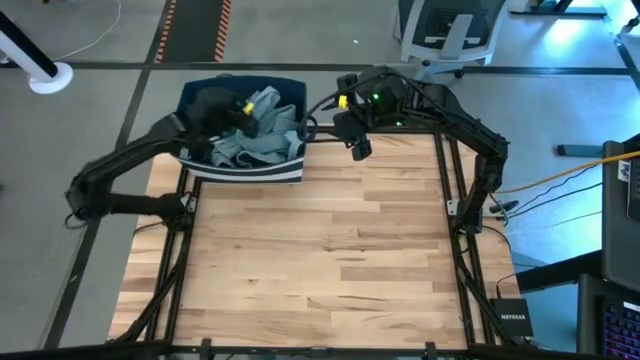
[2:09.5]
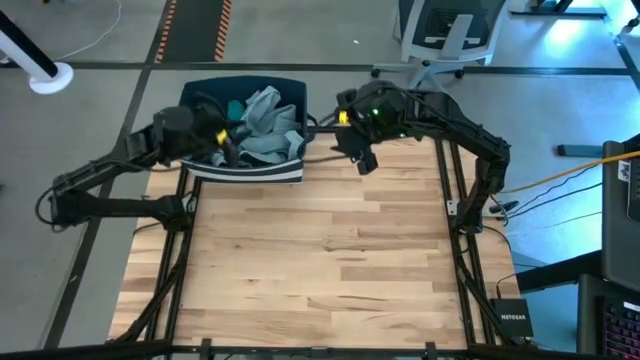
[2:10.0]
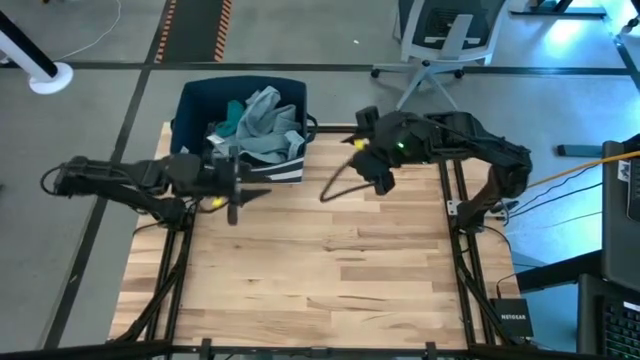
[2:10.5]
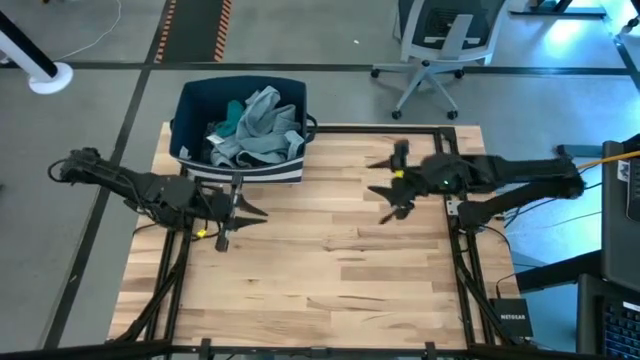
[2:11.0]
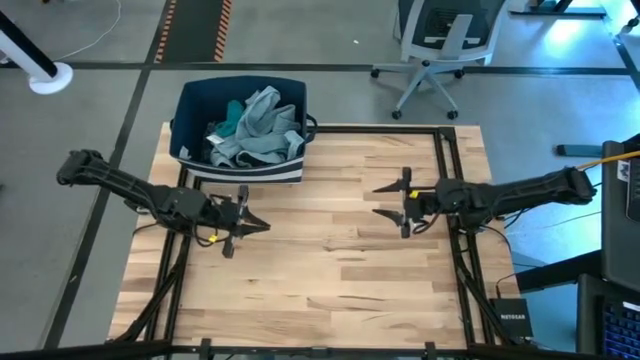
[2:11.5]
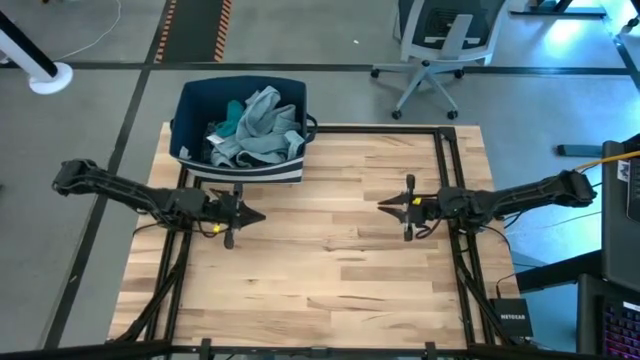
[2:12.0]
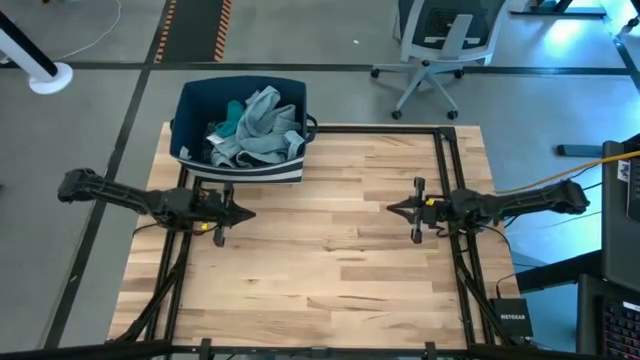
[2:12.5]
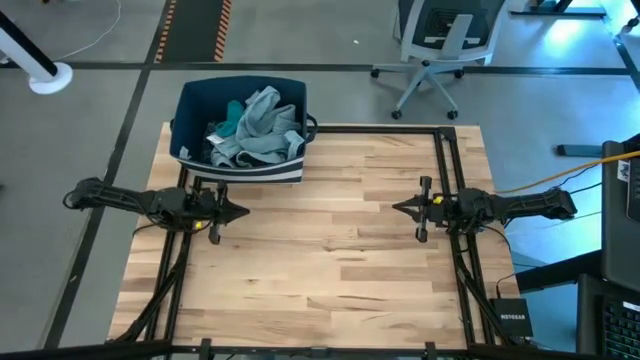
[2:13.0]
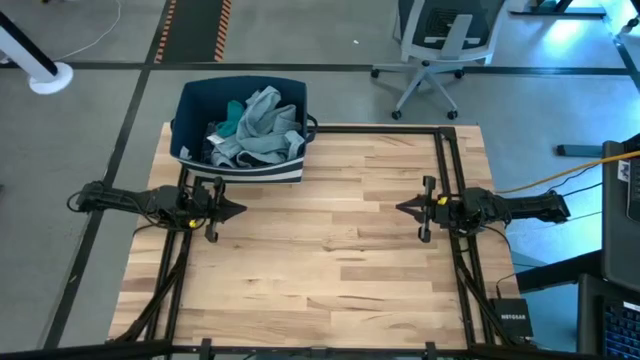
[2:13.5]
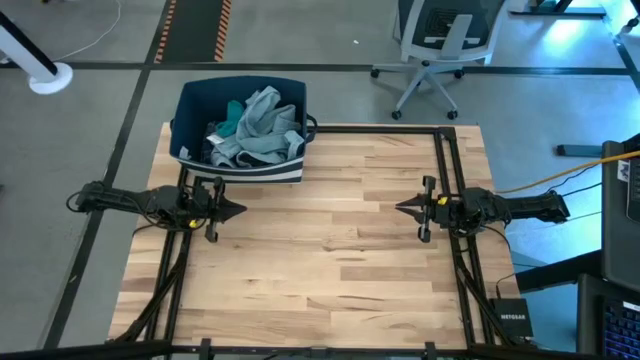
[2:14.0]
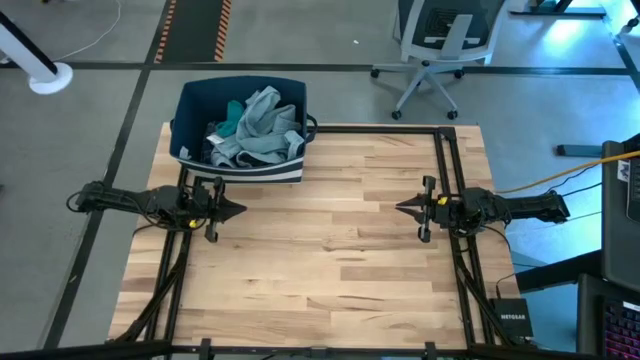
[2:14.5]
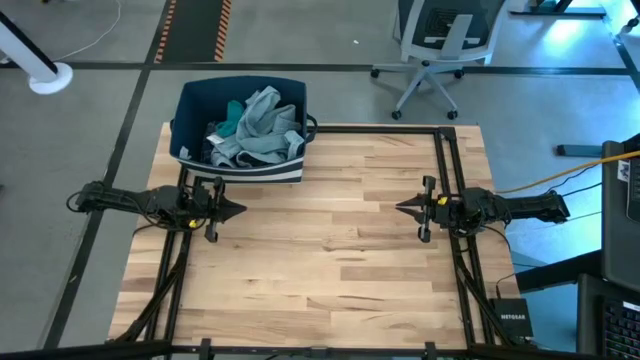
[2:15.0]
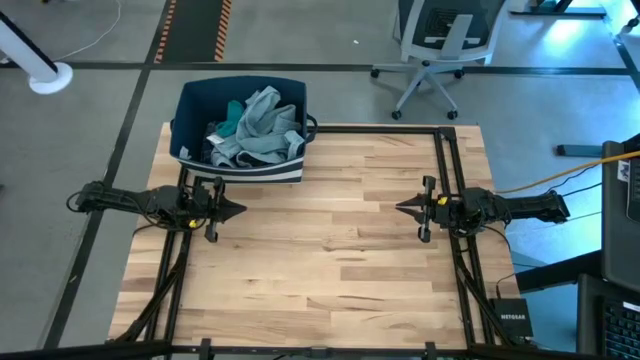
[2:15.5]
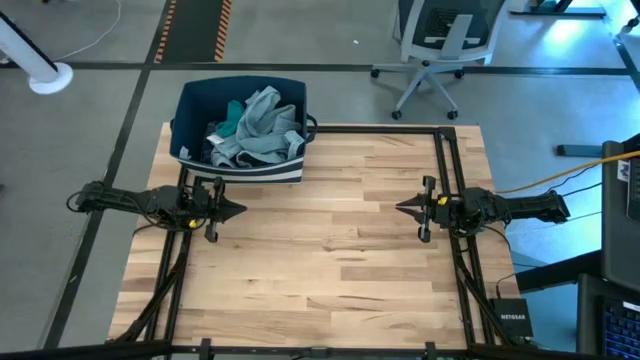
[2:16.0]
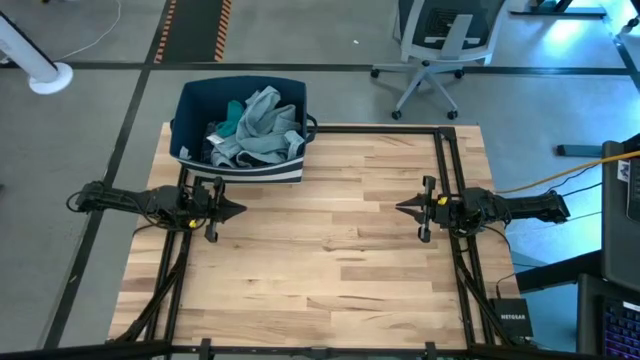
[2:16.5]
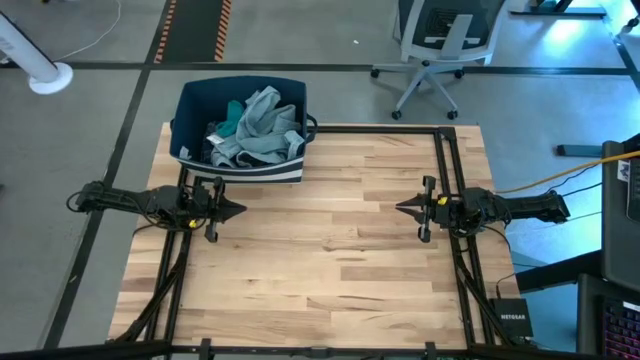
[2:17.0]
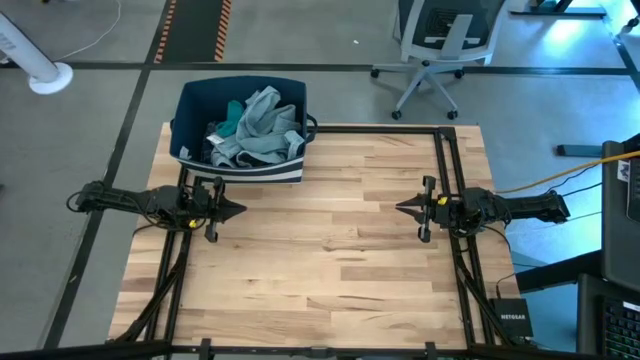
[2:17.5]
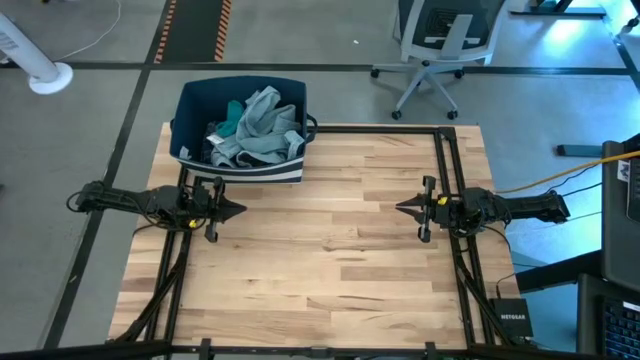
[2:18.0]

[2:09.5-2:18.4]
Task: Sort clothes
Return to Home Position

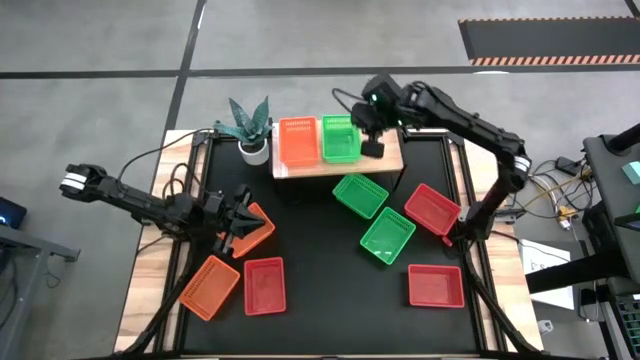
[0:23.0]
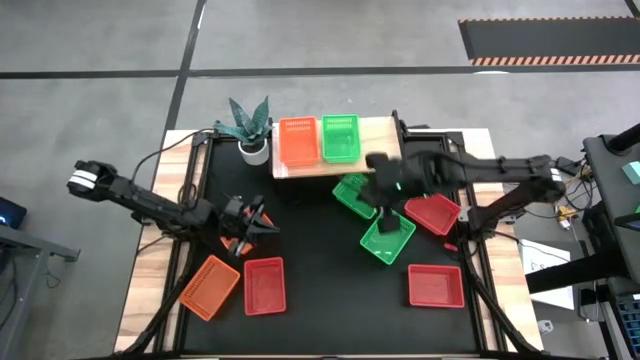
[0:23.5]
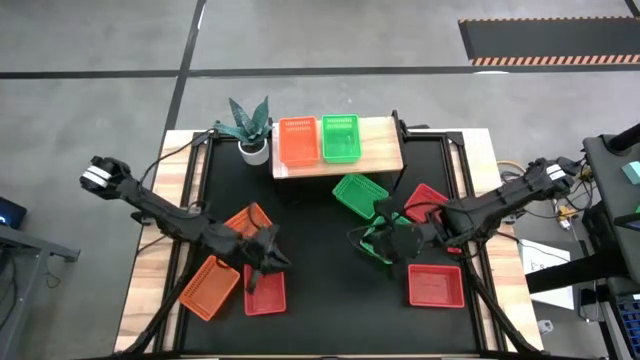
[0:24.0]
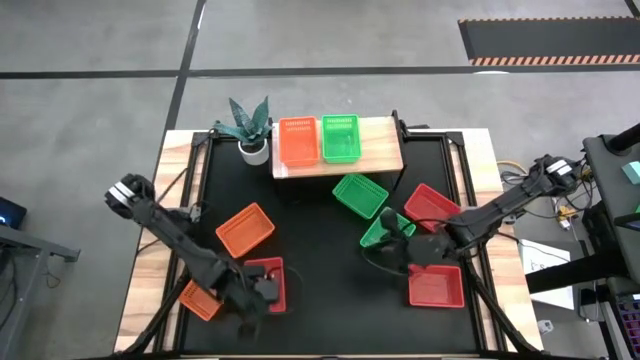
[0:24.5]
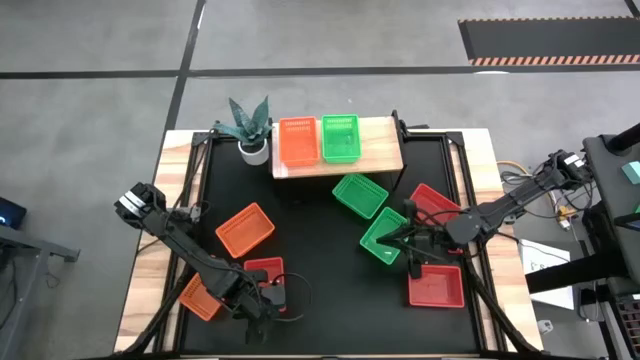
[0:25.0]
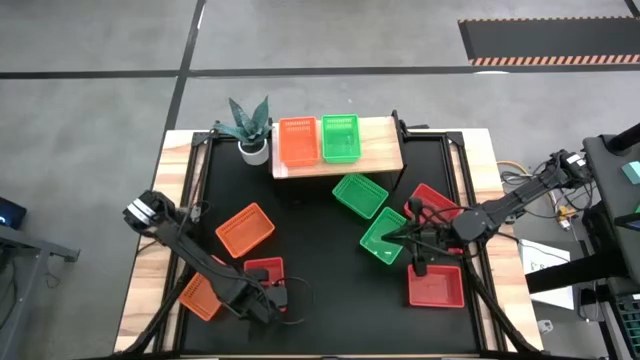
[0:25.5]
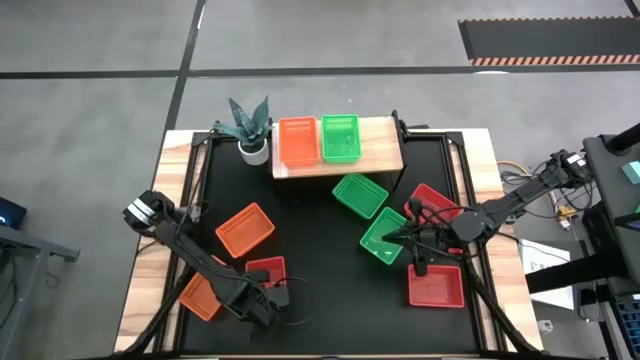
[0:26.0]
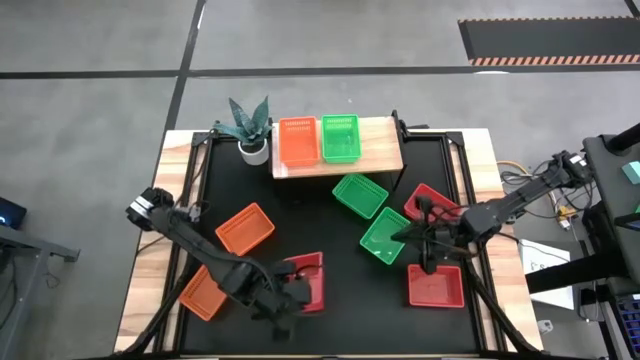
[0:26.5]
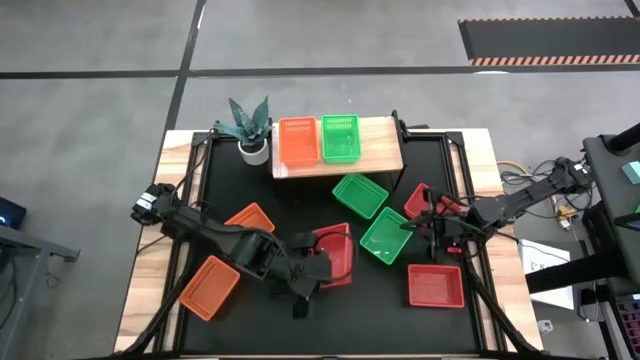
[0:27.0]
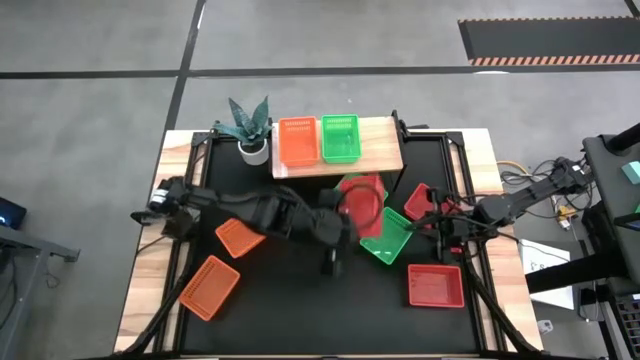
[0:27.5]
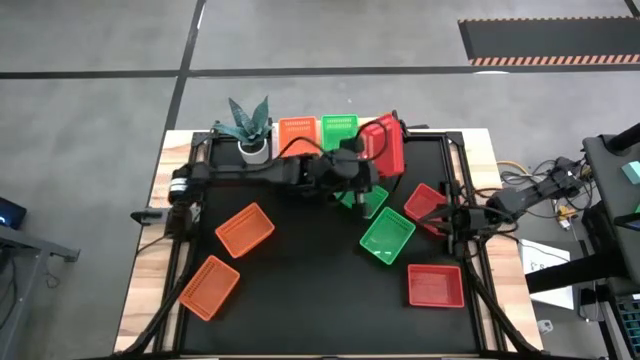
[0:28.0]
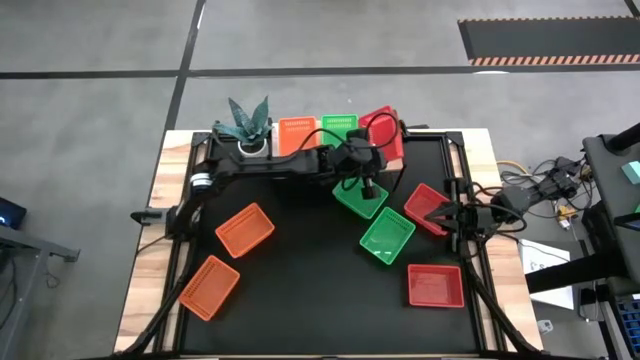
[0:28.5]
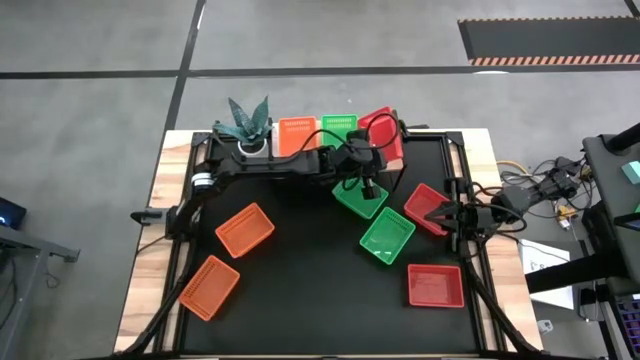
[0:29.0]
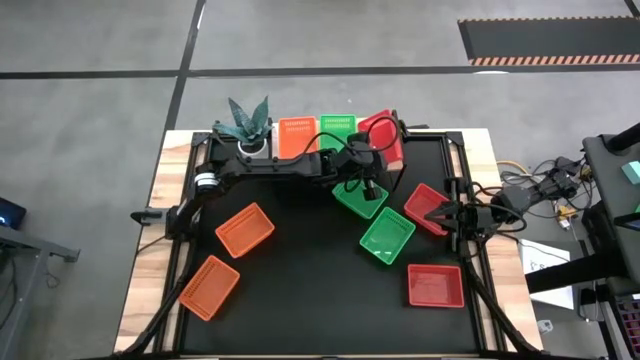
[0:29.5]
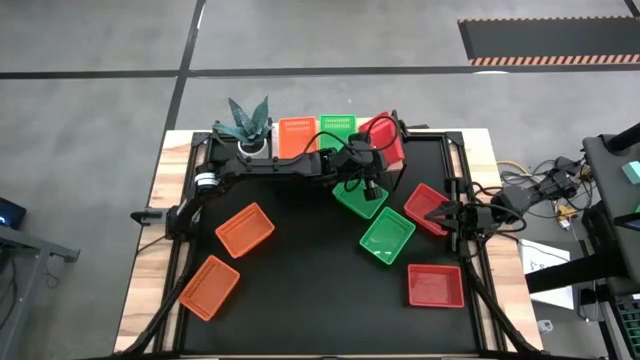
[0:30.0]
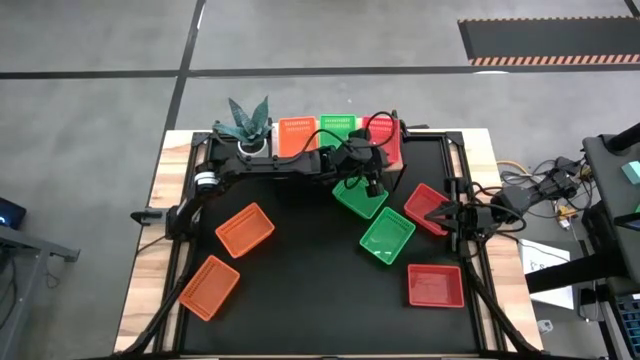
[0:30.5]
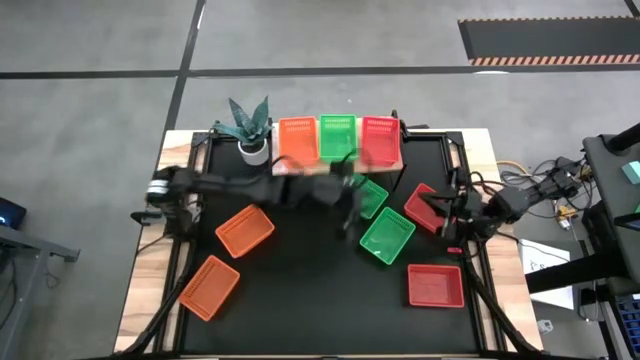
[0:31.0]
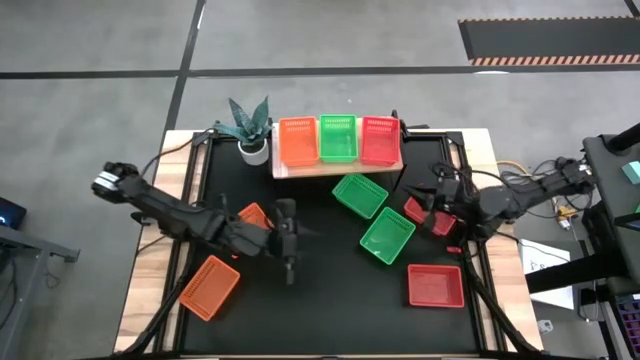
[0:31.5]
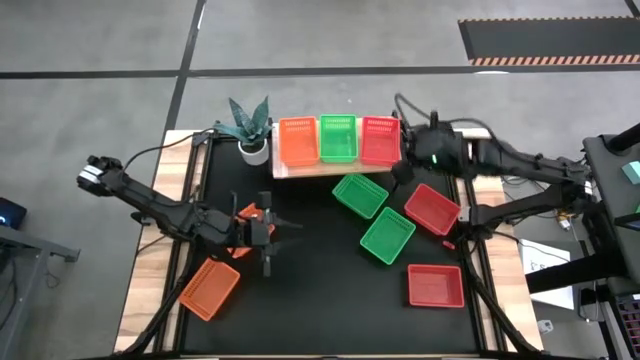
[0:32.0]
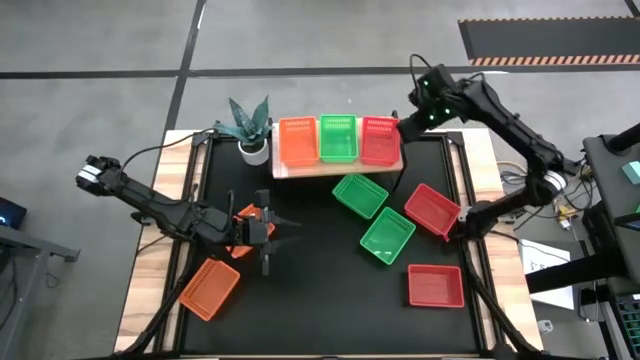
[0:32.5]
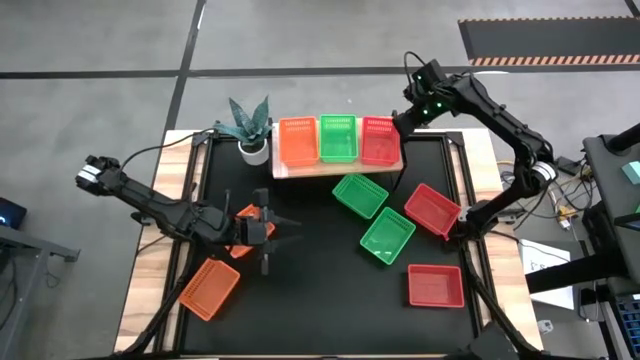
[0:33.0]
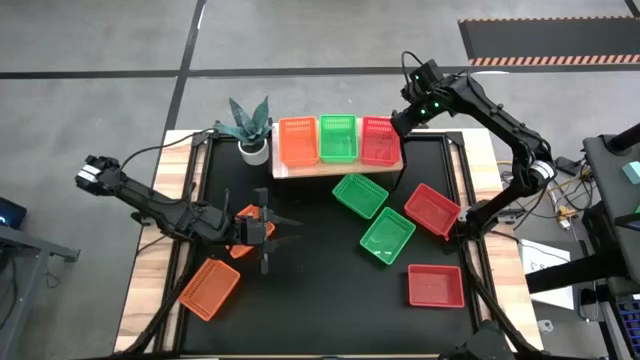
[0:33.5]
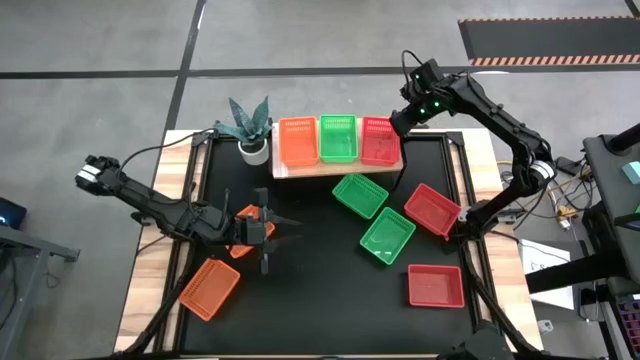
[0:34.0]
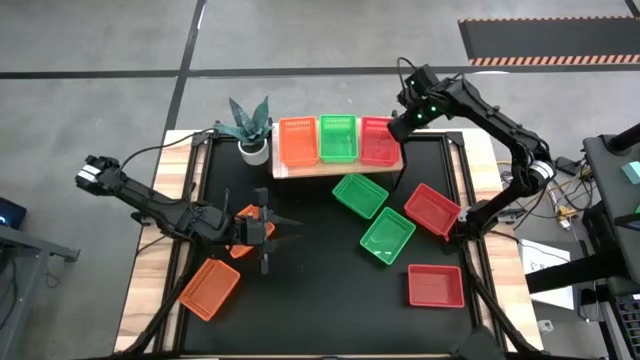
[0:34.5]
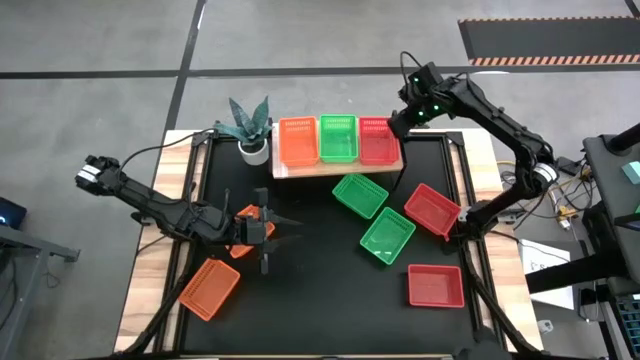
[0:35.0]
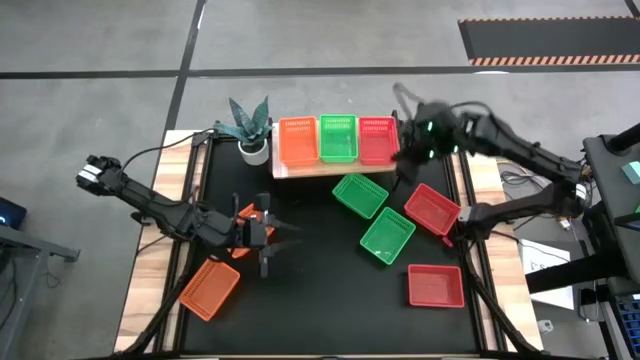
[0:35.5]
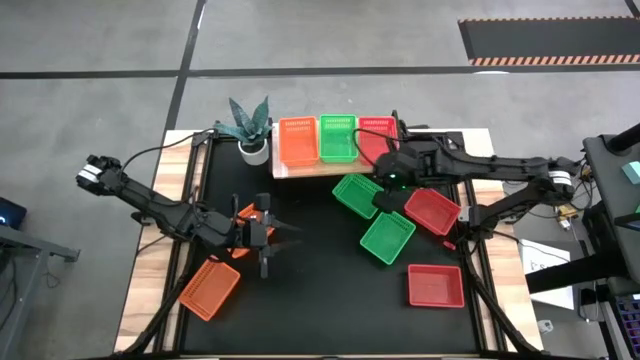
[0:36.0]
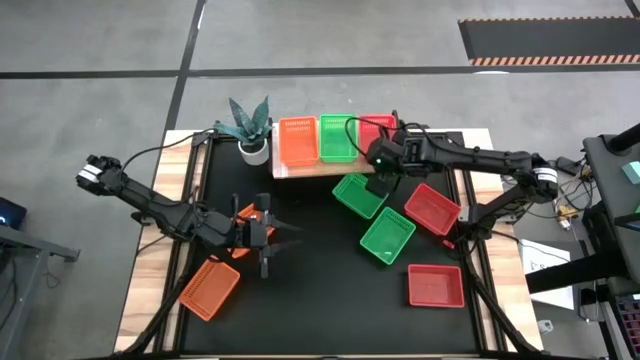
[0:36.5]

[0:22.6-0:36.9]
Task: Stack baskets on shelf by color
Put the bottom left red bin on the shelf
